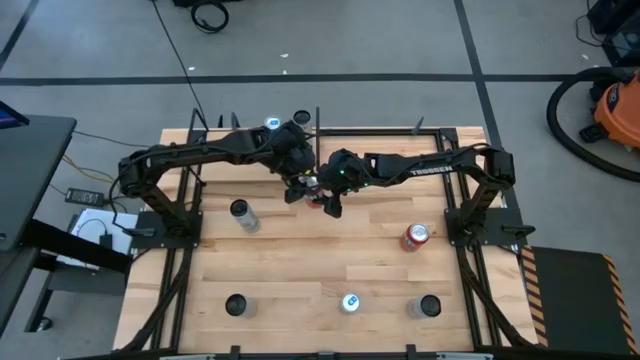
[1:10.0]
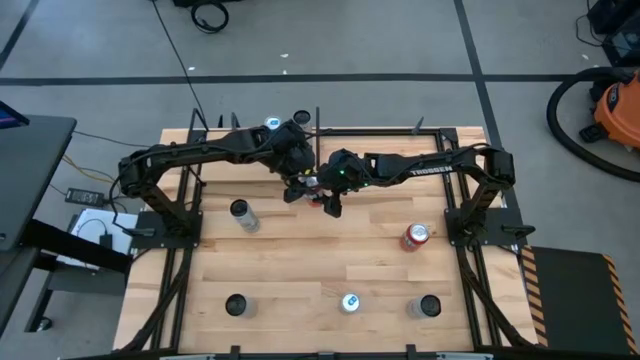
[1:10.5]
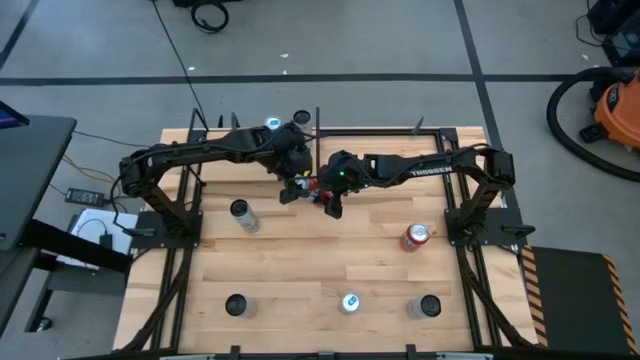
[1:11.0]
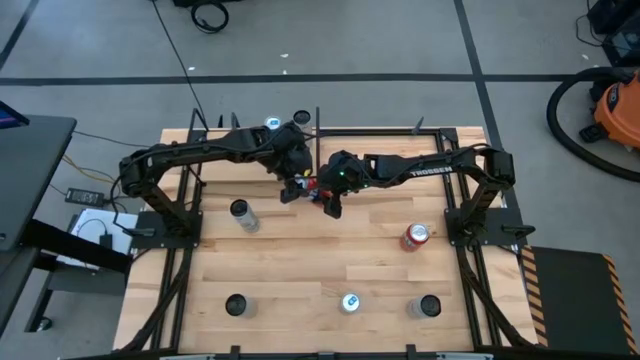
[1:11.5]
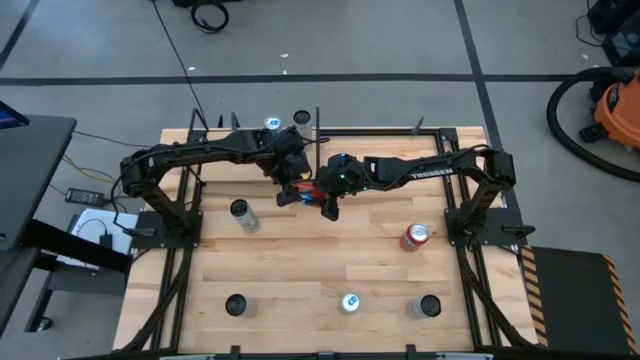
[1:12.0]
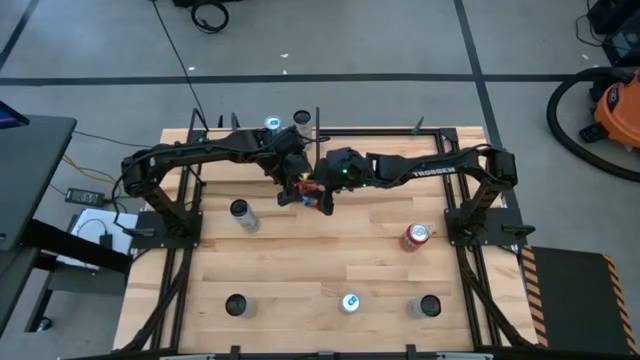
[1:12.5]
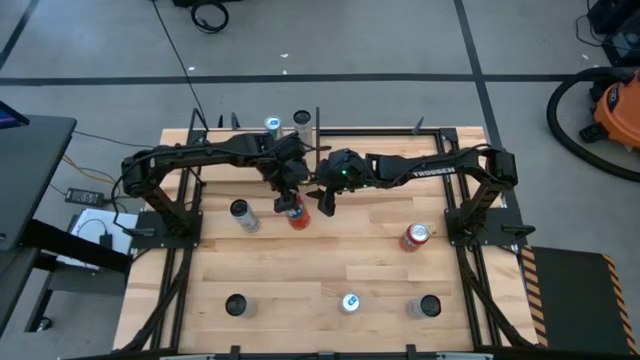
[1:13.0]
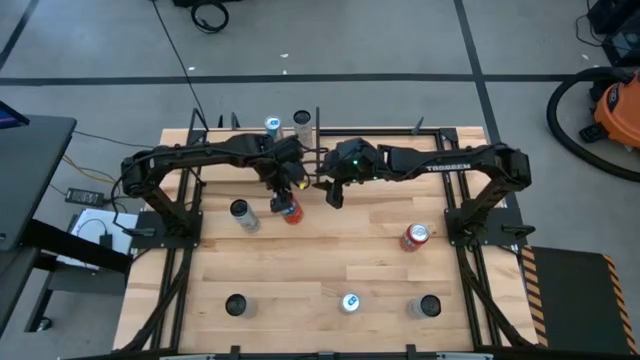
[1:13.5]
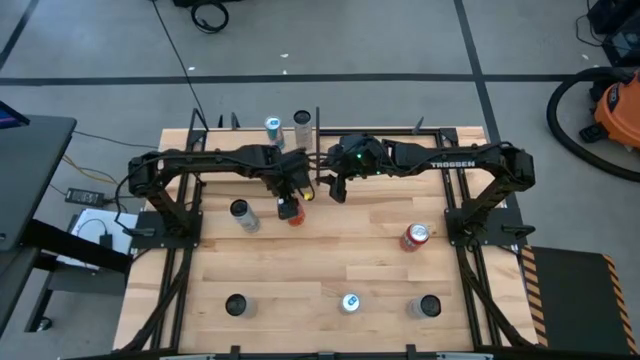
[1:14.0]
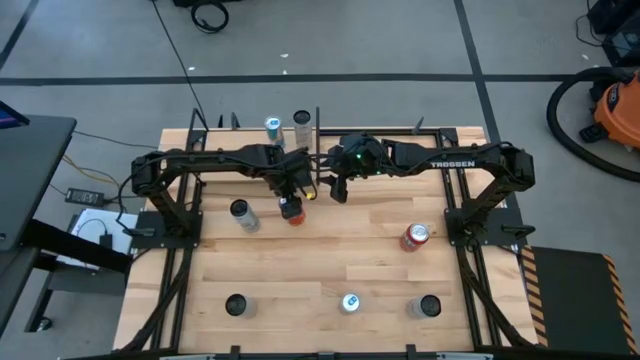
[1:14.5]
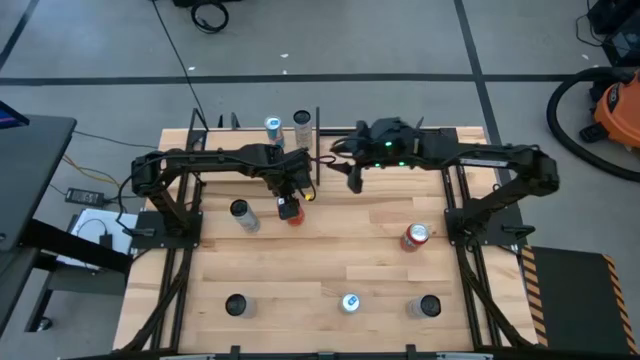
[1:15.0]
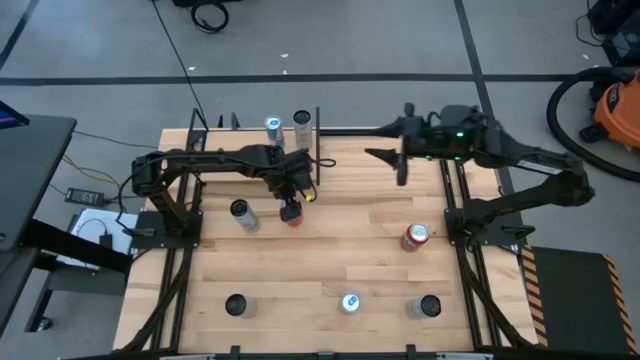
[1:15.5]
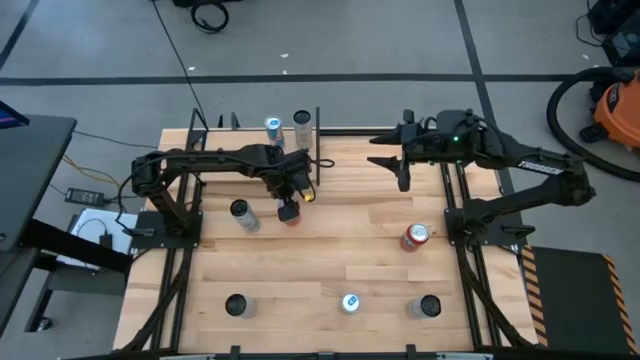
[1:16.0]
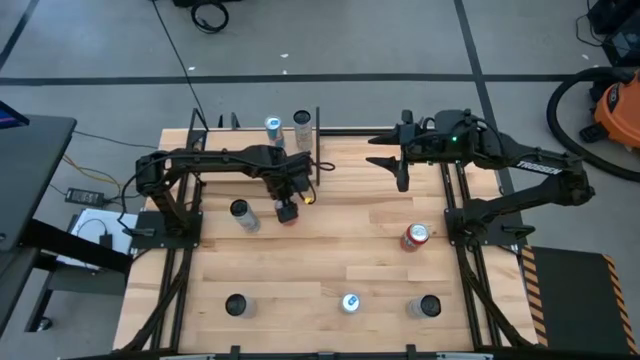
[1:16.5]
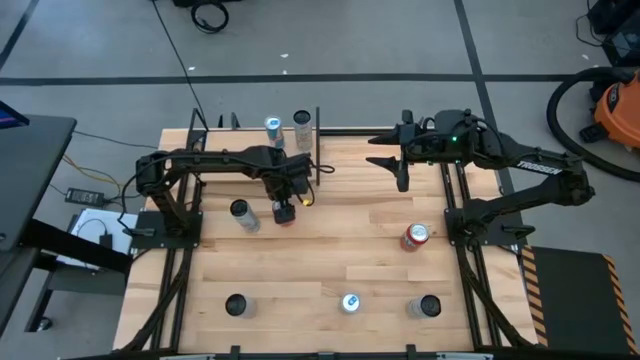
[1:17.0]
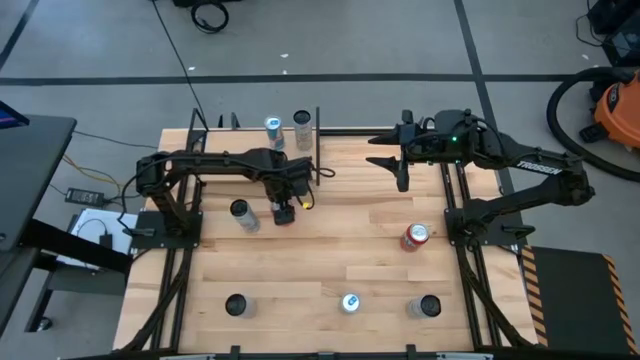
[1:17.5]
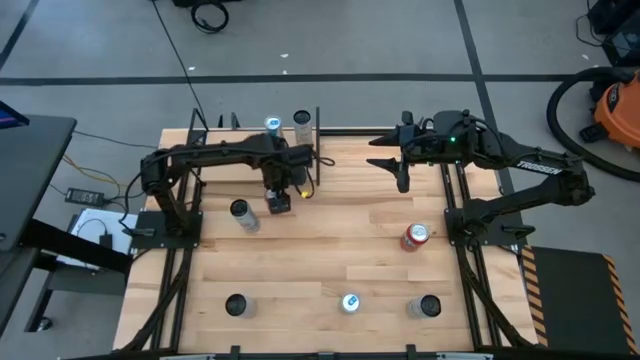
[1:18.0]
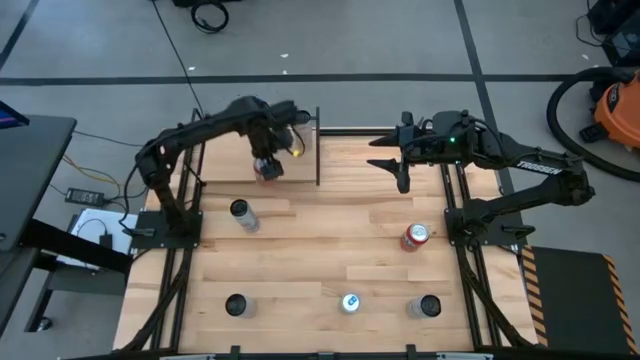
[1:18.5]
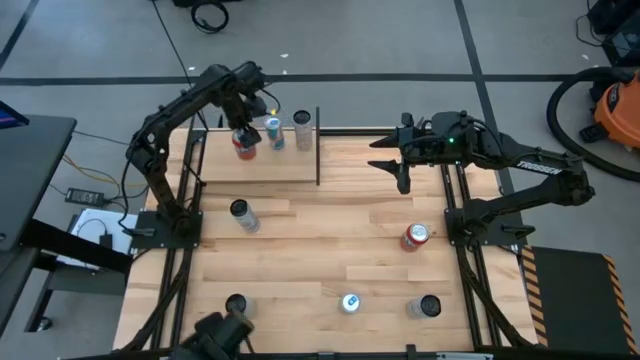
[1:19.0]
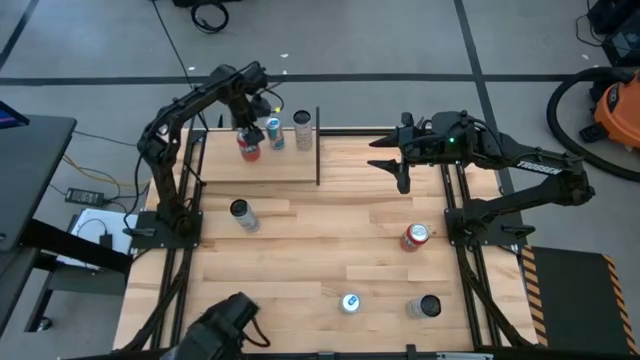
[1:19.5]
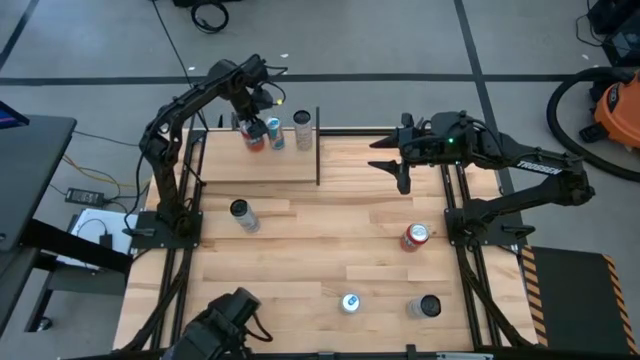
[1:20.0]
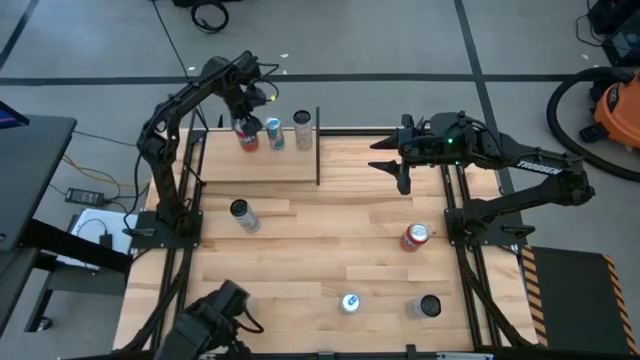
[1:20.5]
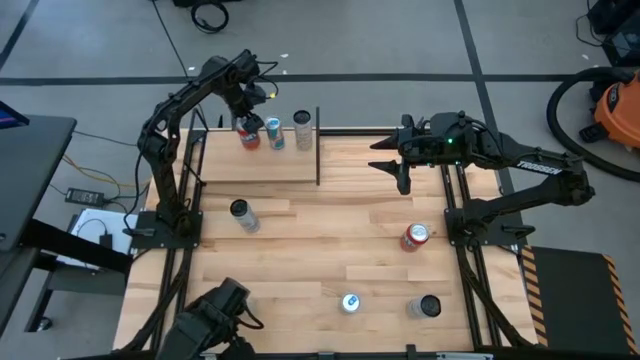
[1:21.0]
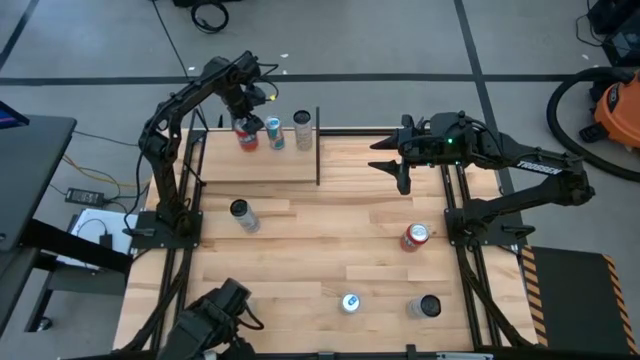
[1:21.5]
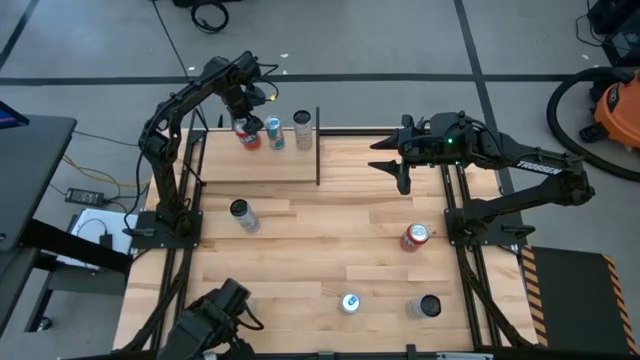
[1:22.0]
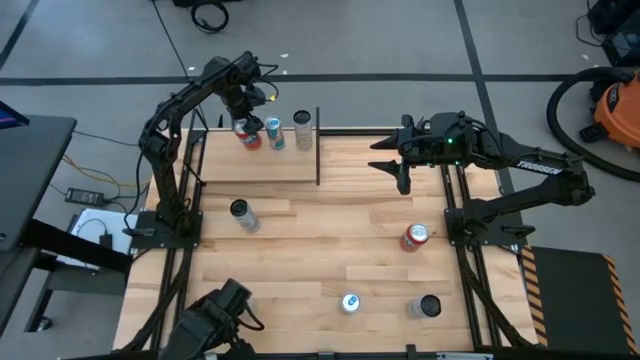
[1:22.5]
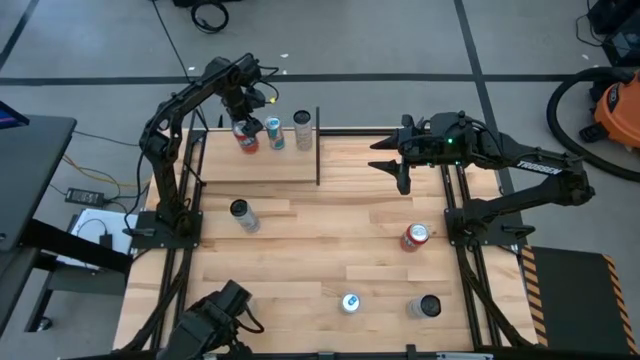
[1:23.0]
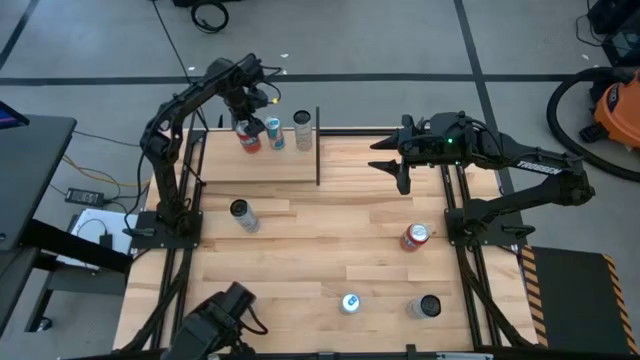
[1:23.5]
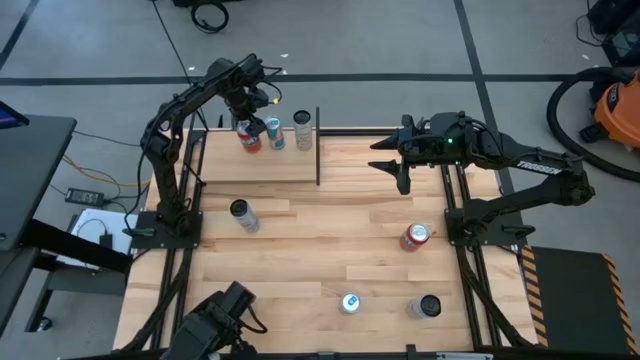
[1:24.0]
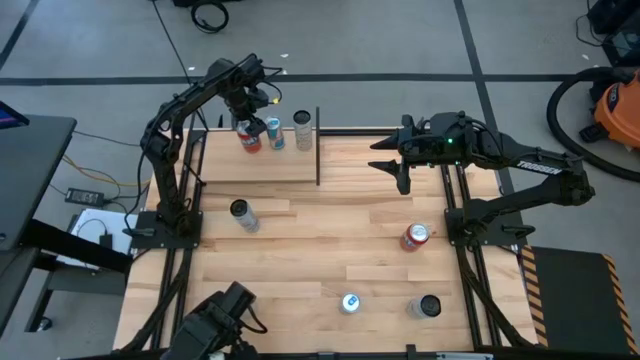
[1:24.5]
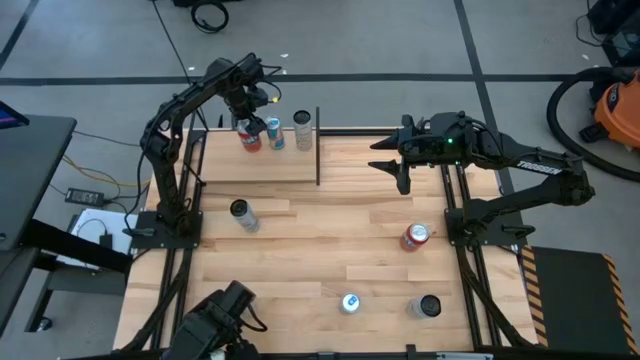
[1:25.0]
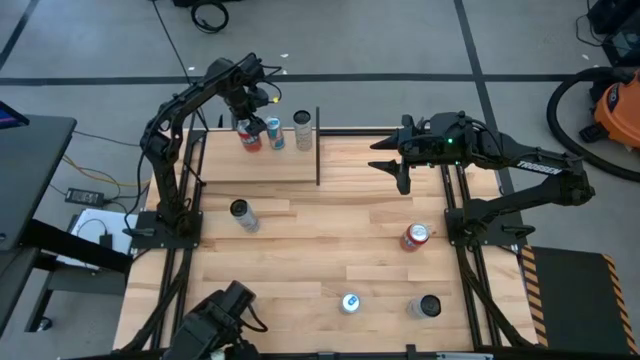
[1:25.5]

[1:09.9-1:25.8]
Task: Place canned beverage on shelf
Put the top orange soda can on the shelf

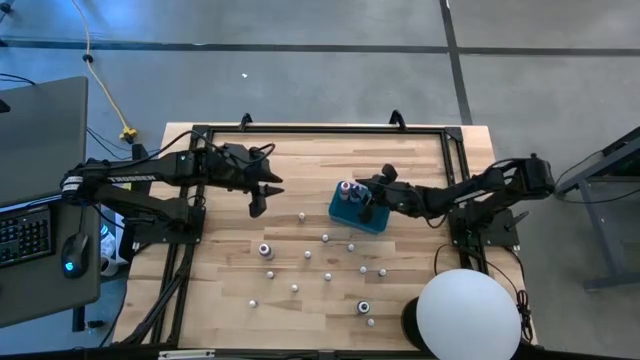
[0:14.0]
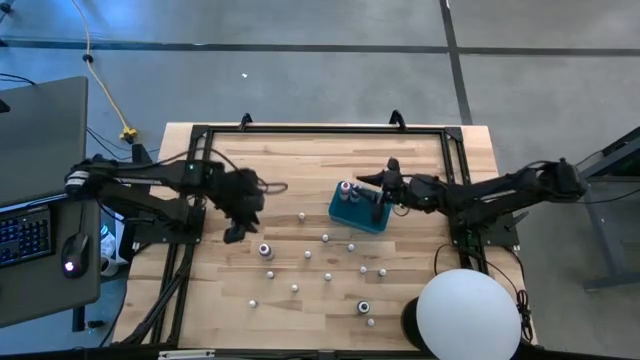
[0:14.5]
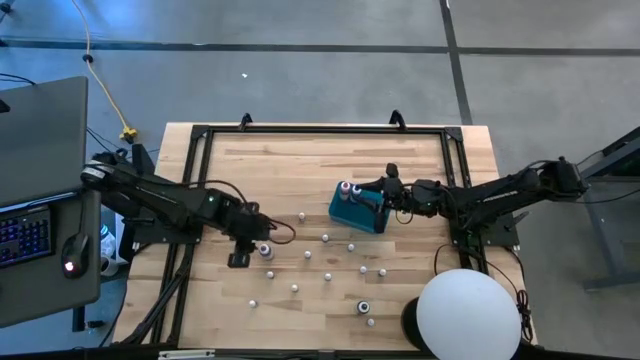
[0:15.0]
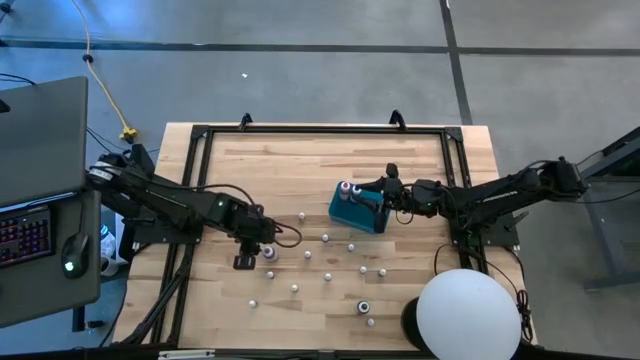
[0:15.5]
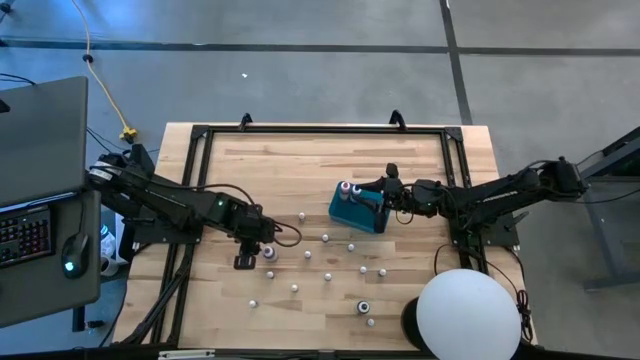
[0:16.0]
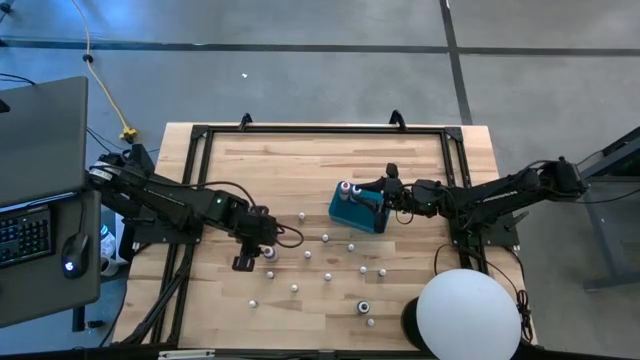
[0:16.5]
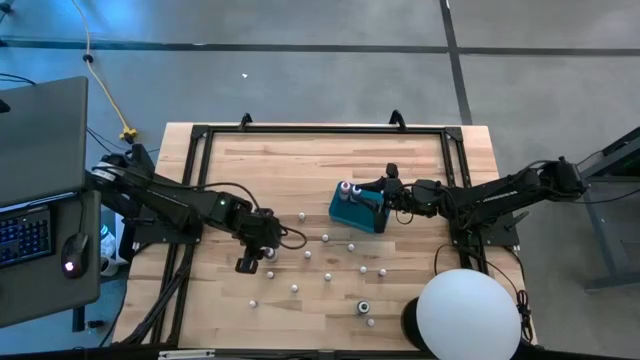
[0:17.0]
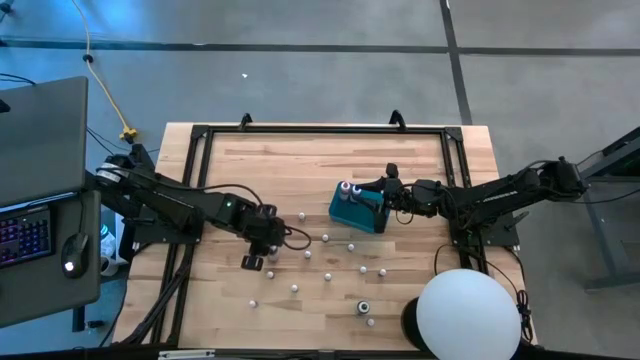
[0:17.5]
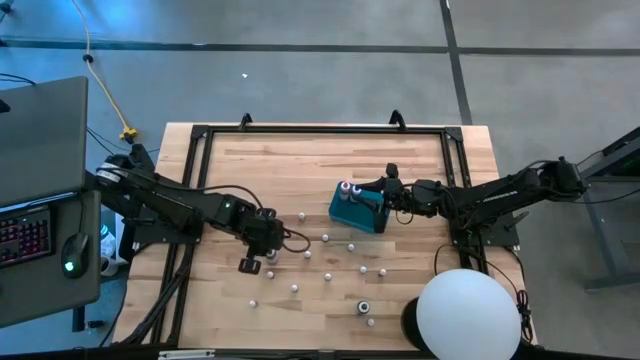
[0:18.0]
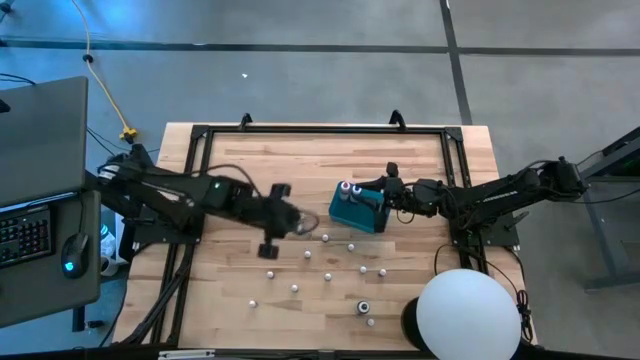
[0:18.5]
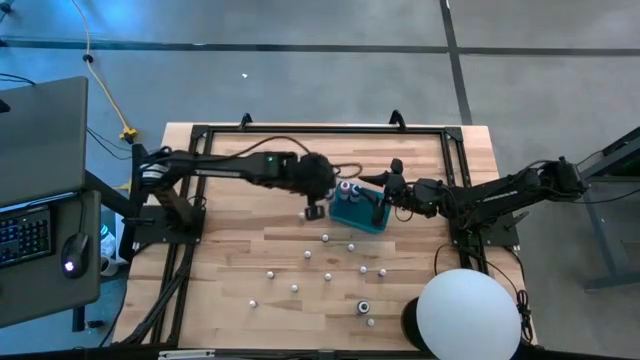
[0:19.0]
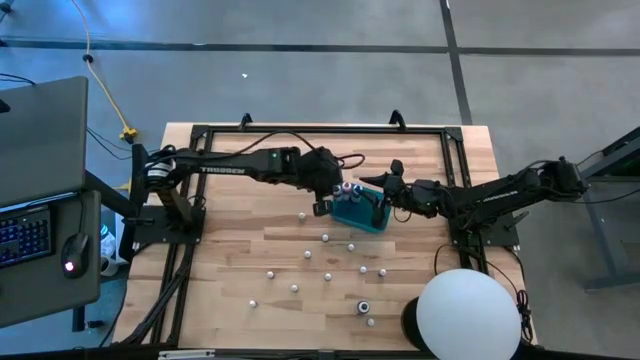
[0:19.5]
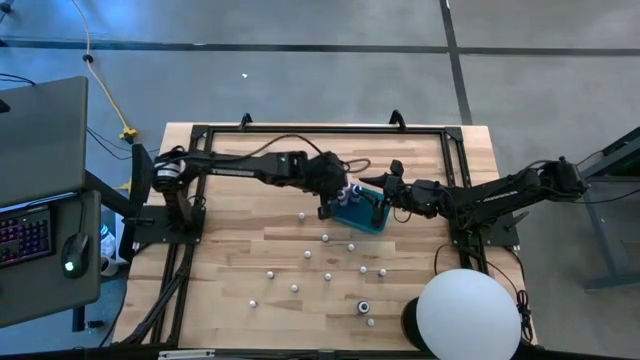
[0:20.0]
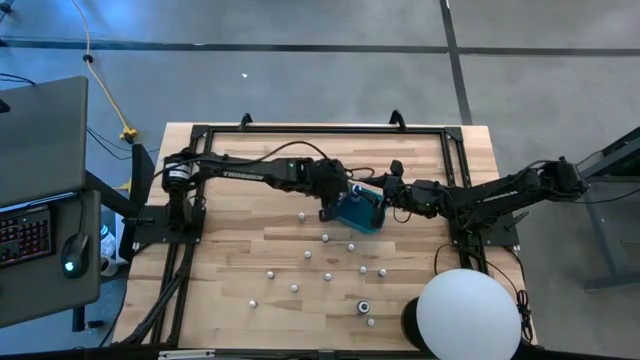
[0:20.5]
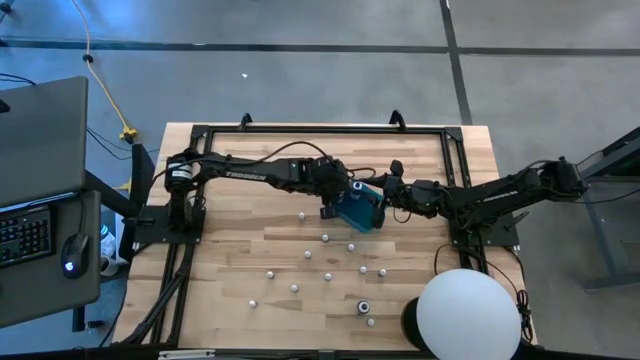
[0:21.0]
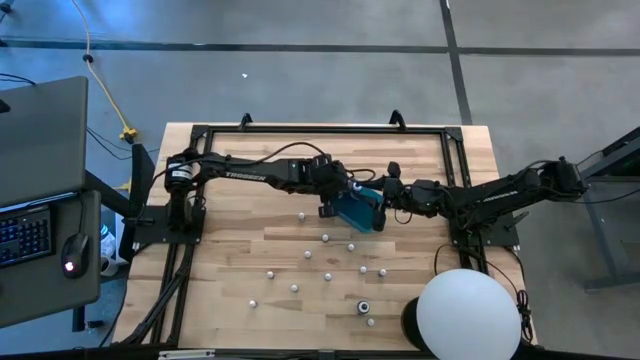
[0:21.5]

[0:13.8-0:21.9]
Task: Pick & Place food coloring
Put the large violet food coloring bottle into the blue container
